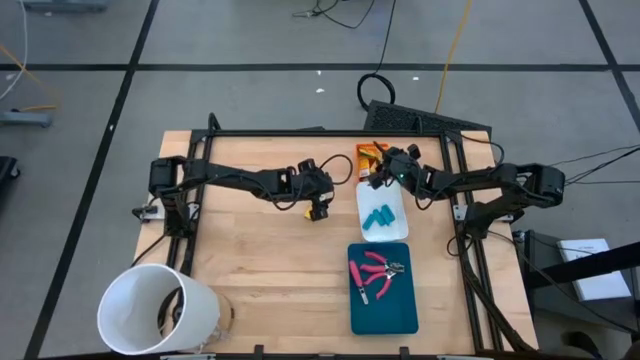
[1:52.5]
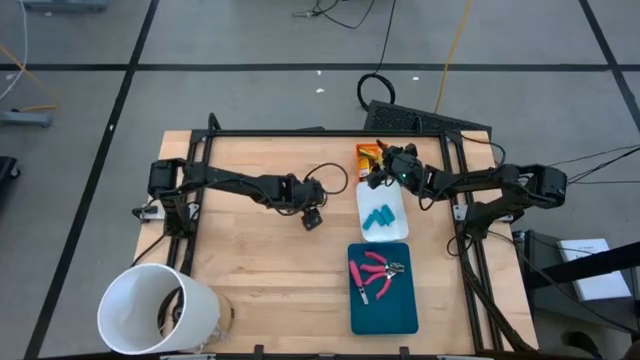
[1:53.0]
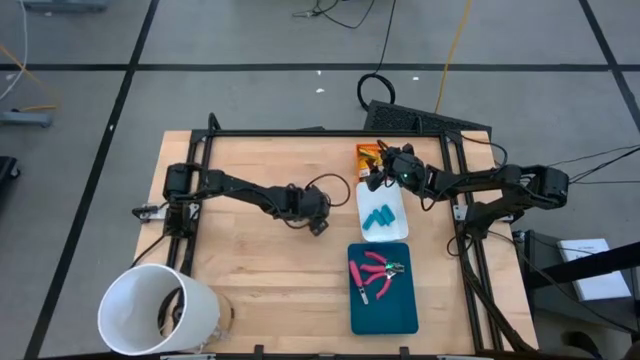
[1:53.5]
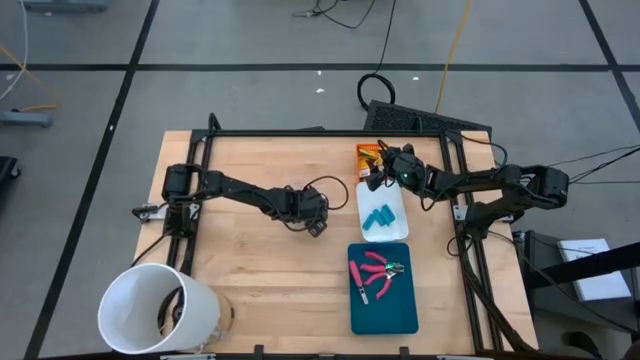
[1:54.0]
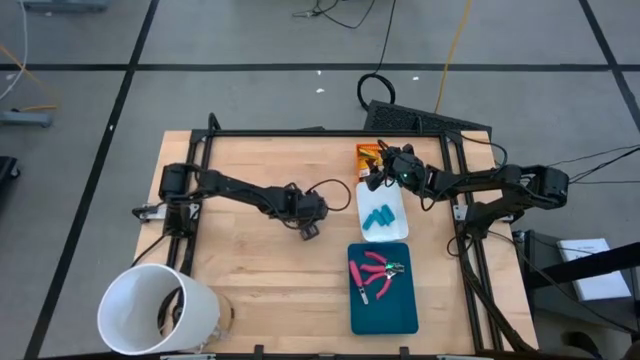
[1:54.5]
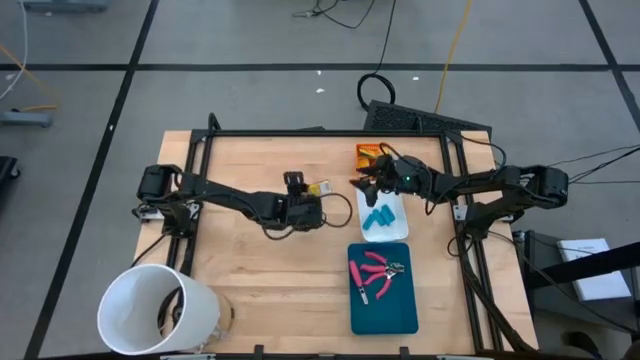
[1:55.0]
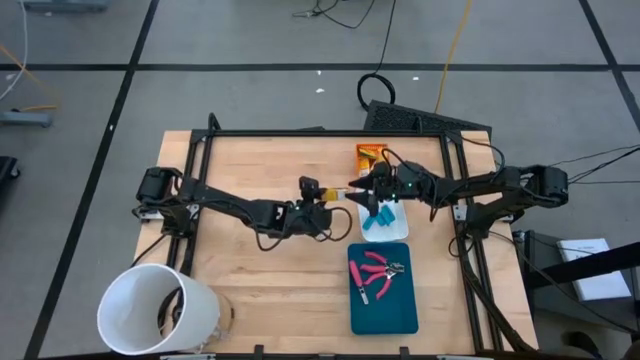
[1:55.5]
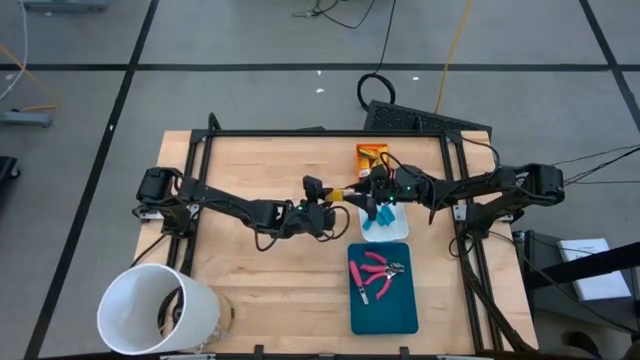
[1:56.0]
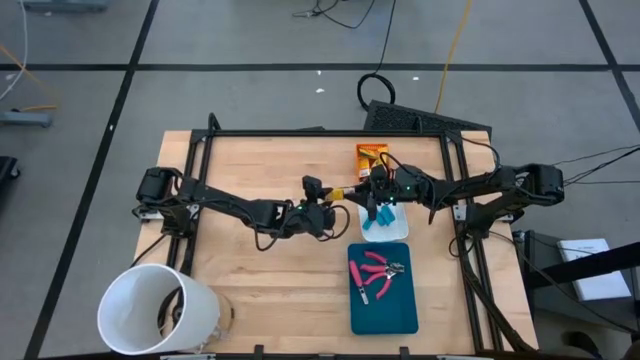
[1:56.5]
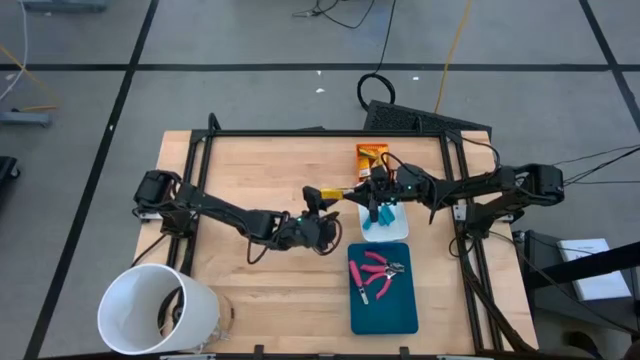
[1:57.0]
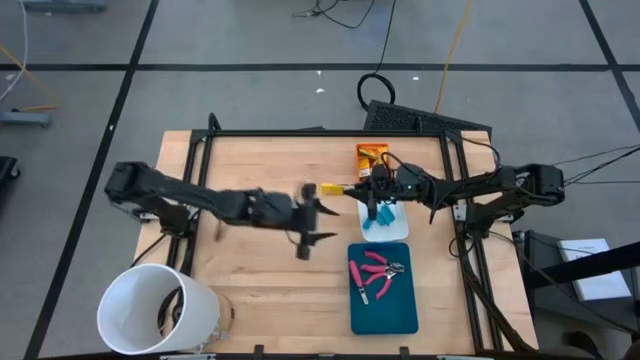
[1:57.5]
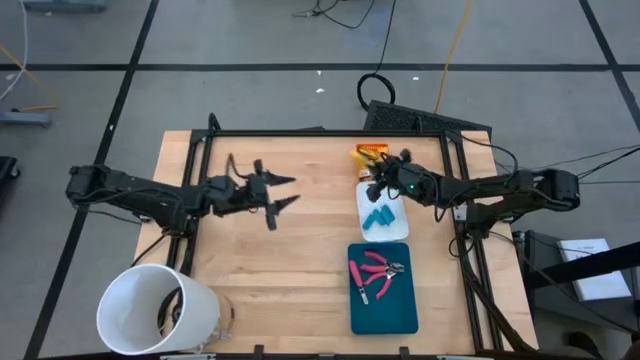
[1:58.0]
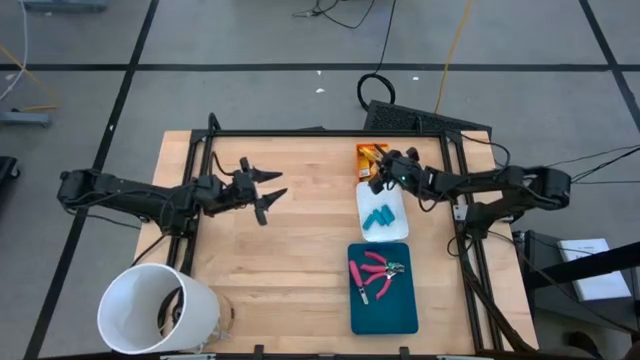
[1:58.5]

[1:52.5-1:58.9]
Task: Pick & Place School Supplies
Put the yellow crayon box into the orange bin

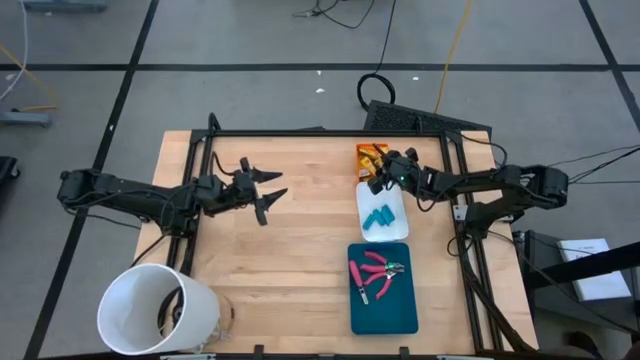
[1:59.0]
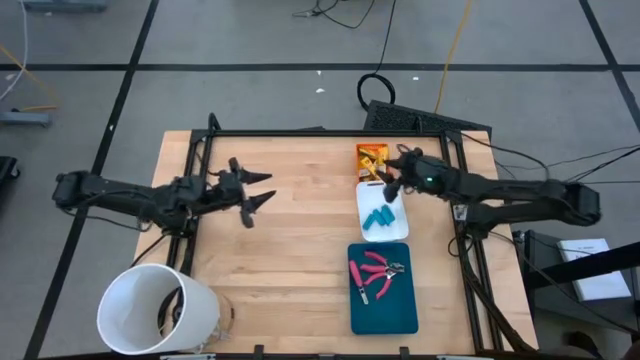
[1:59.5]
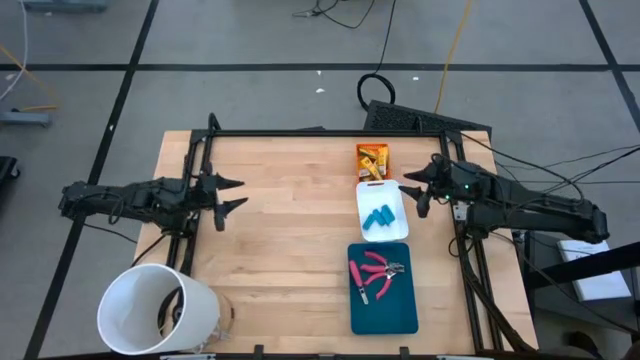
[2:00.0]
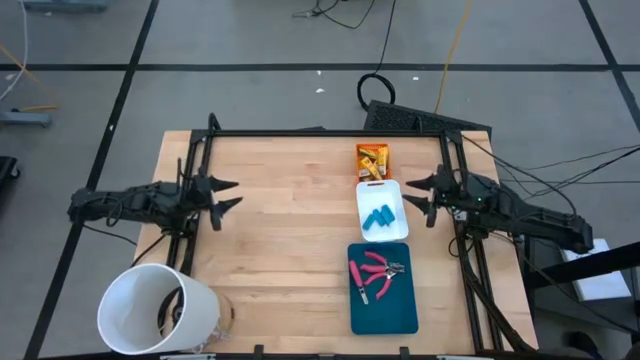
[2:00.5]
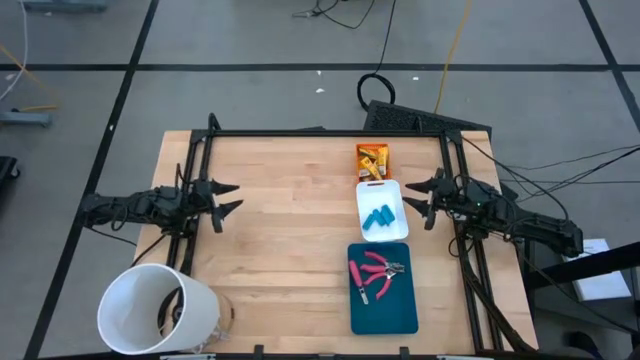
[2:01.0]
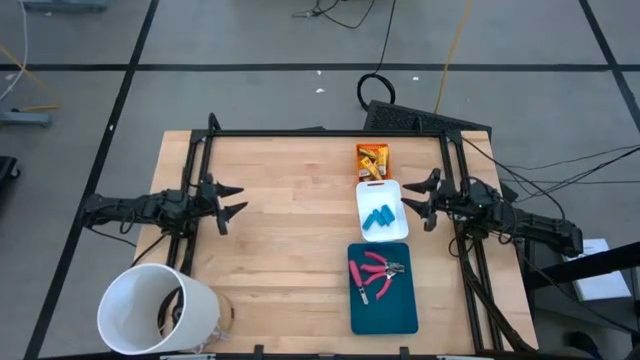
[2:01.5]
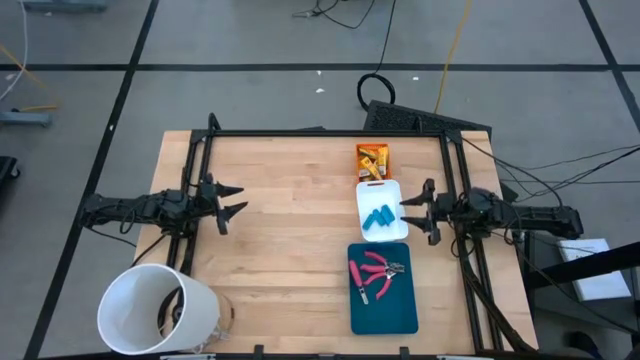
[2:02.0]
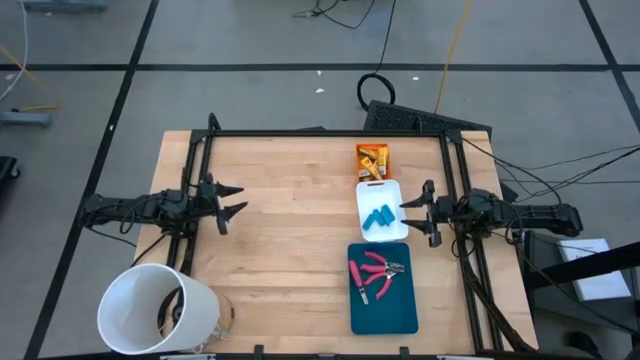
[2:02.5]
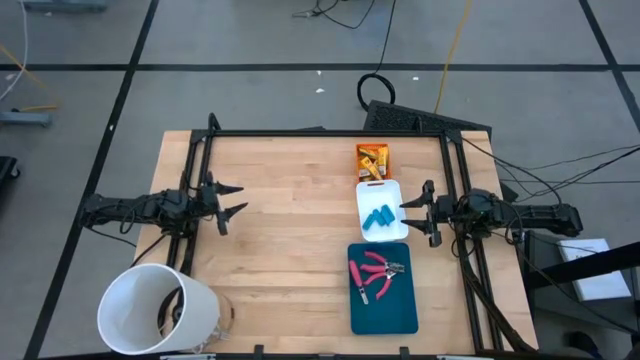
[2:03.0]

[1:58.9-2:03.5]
Return to Home Position

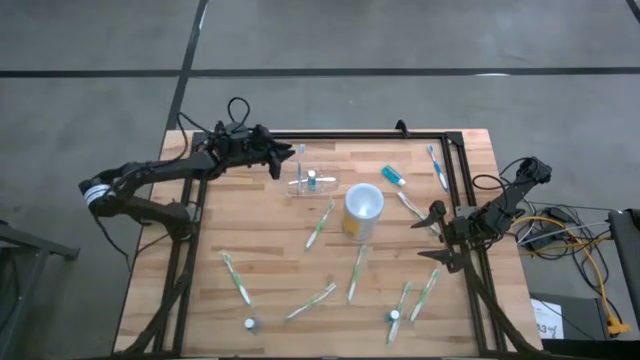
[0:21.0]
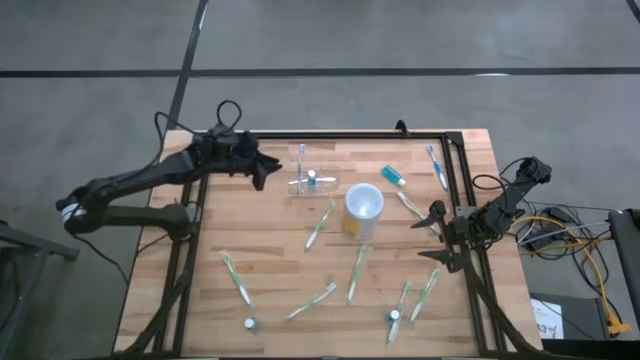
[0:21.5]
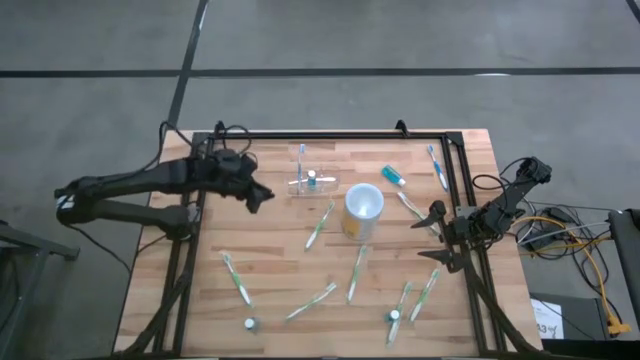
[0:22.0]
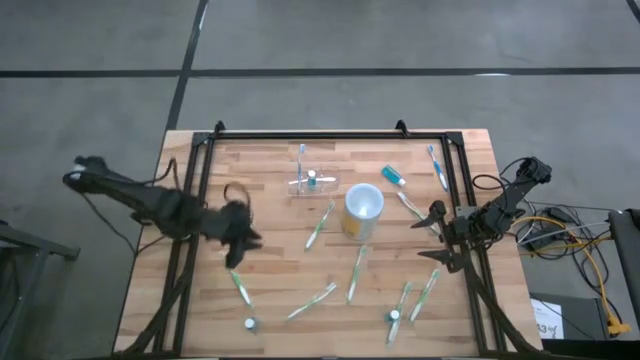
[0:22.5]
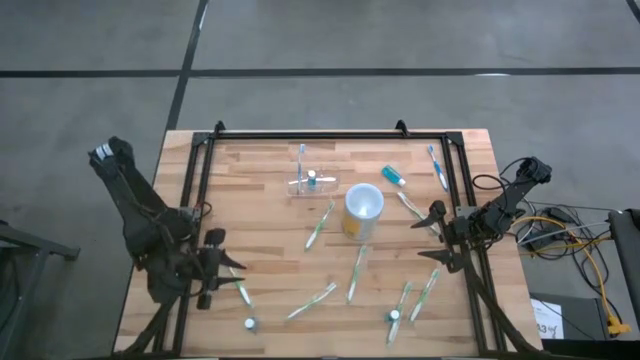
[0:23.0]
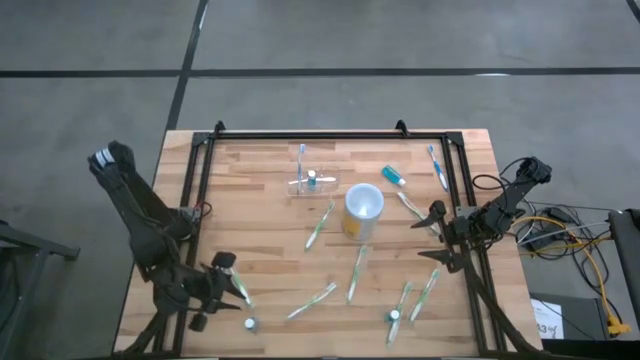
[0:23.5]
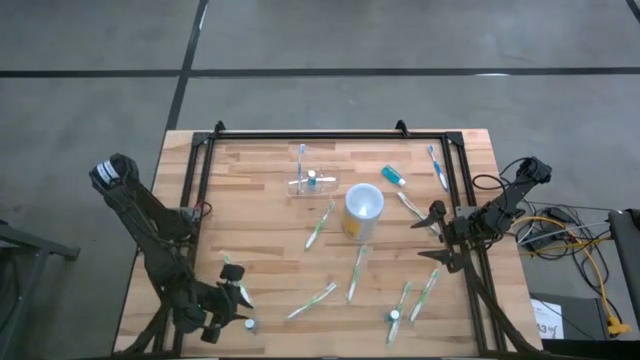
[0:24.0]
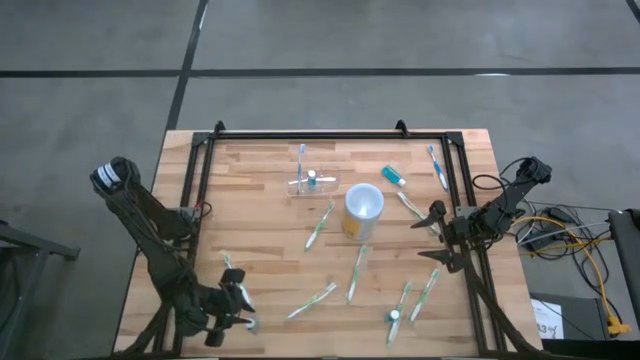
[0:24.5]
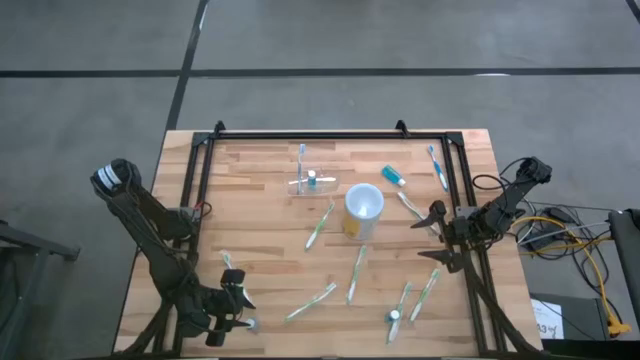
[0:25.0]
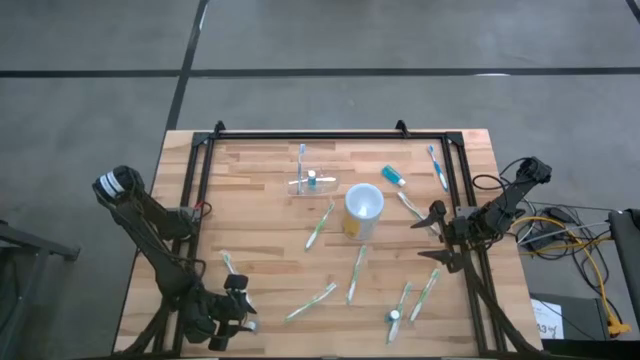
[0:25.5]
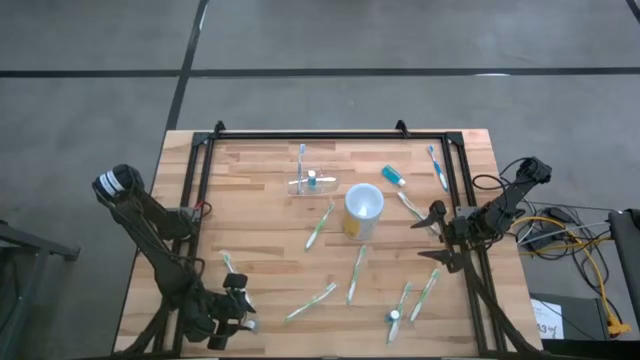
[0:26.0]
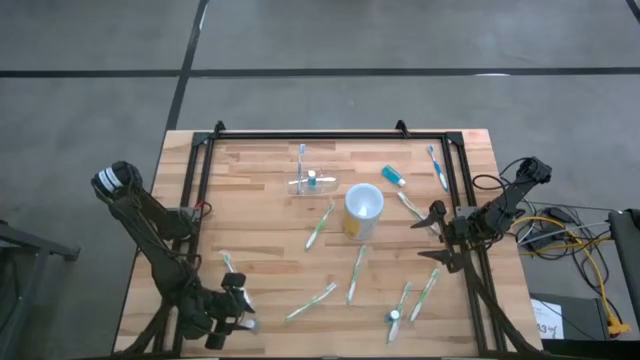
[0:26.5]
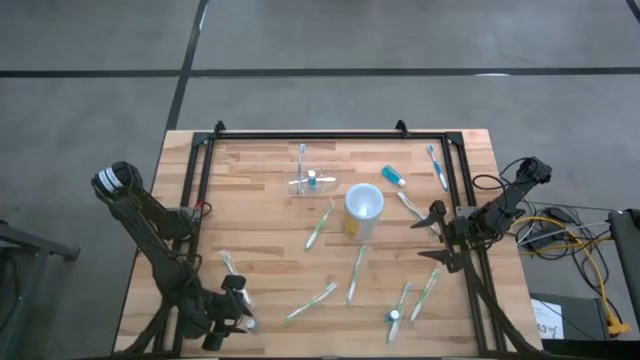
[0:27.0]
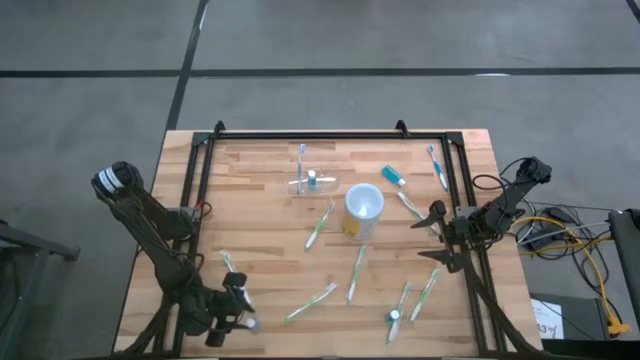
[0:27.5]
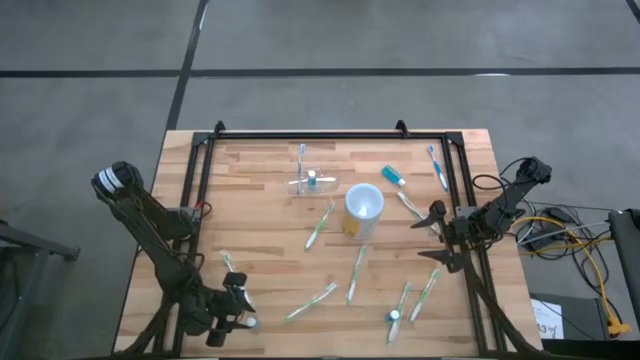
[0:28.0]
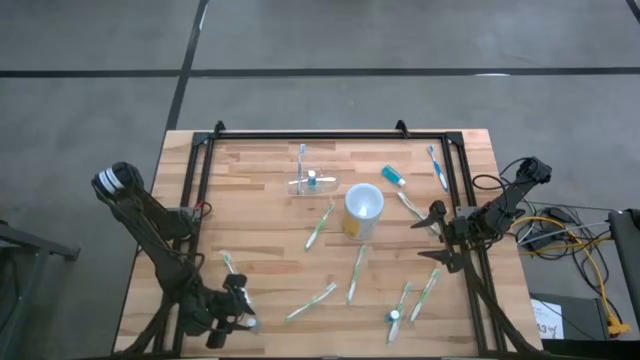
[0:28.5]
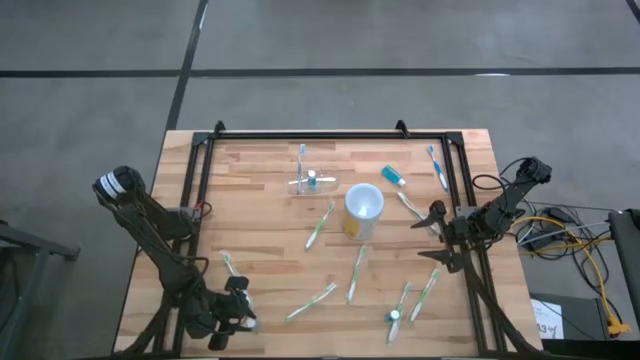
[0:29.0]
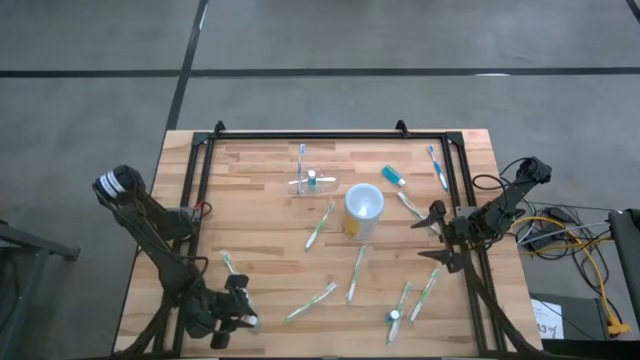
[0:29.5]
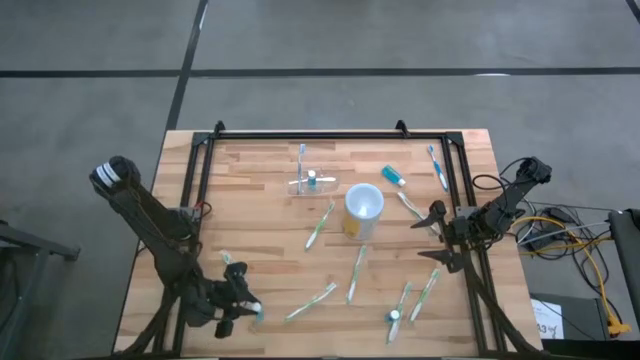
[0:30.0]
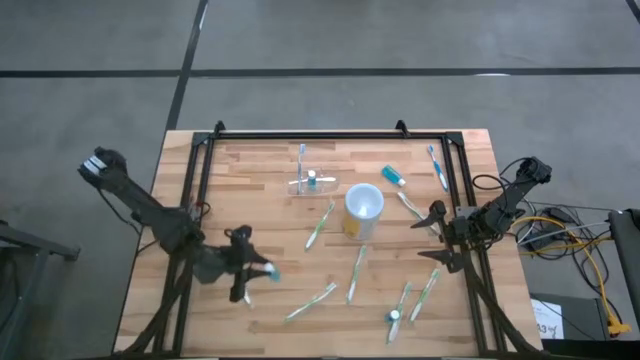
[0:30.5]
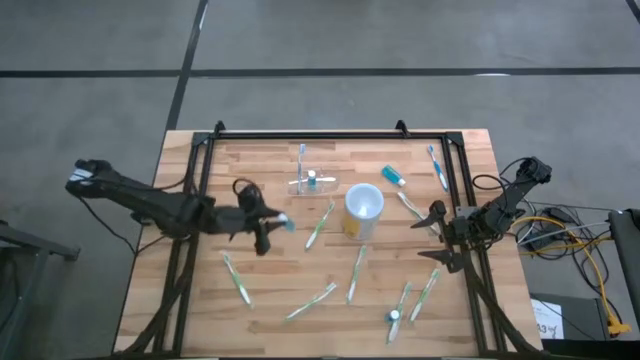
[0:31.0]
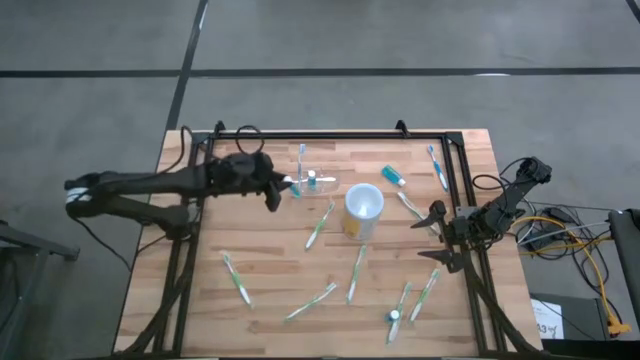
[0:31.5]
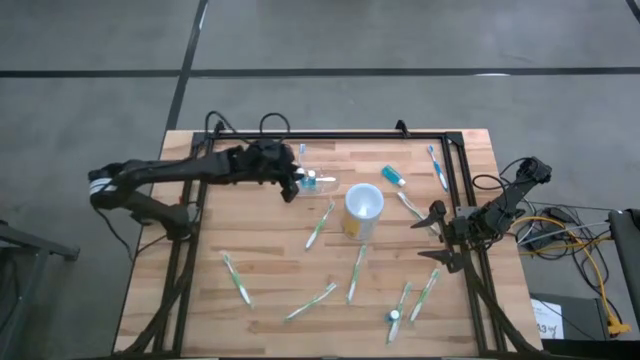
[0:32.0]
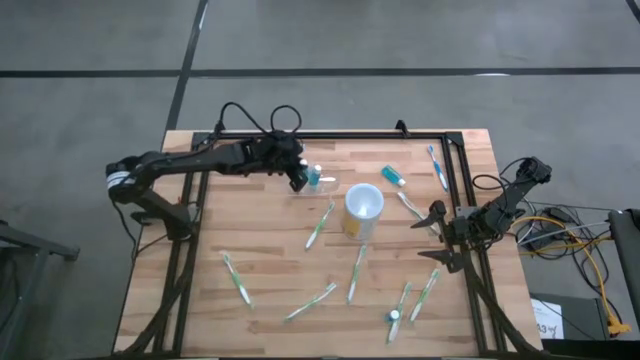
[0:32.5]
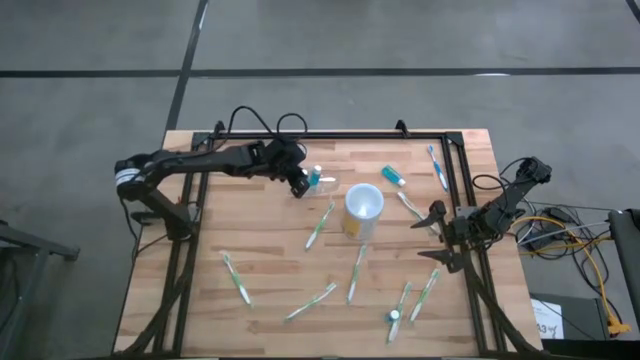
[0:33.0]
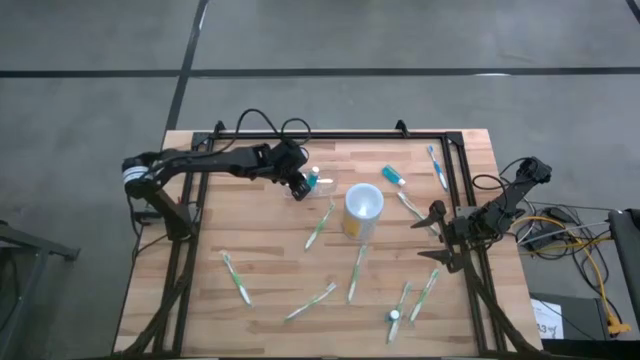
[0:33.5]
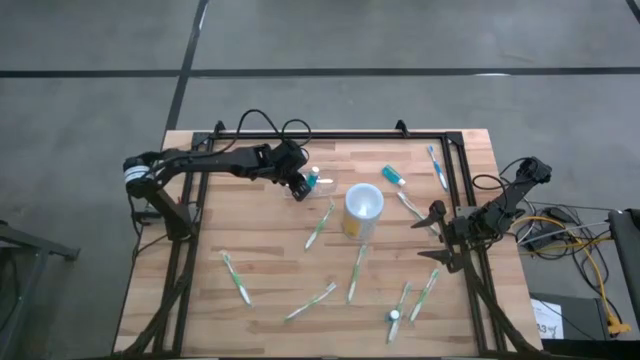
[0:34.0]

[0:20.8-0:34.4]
Task: Pick & Place toothbrushing station
Put the blue mouthwash into the middle section of the transparent organizer
